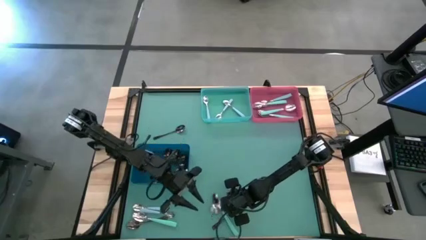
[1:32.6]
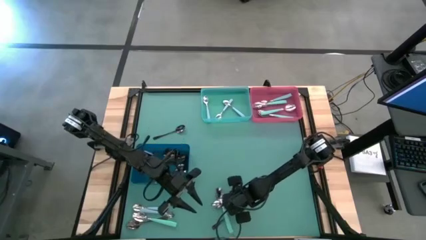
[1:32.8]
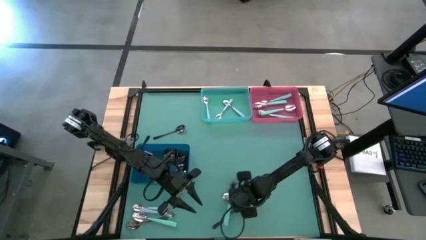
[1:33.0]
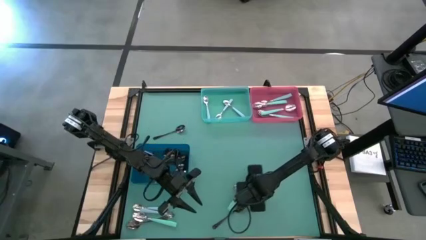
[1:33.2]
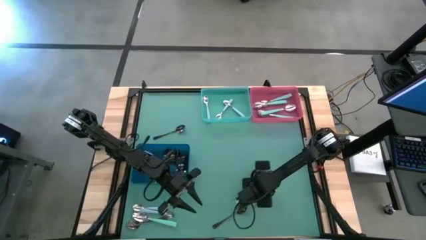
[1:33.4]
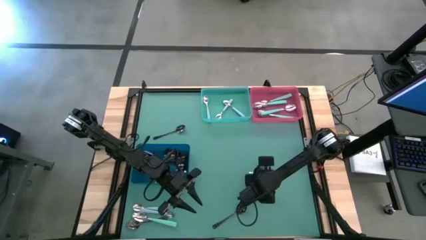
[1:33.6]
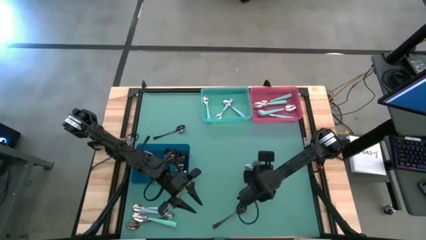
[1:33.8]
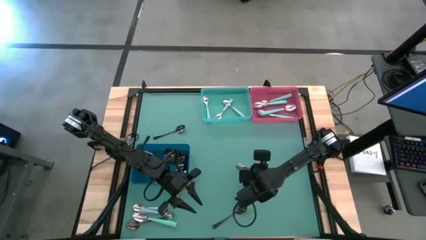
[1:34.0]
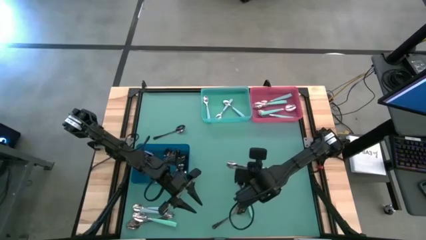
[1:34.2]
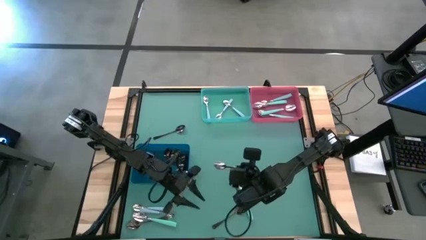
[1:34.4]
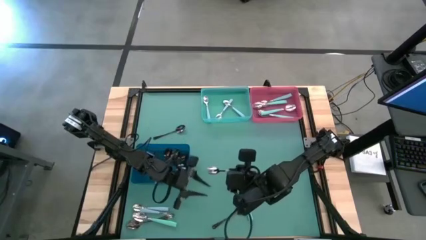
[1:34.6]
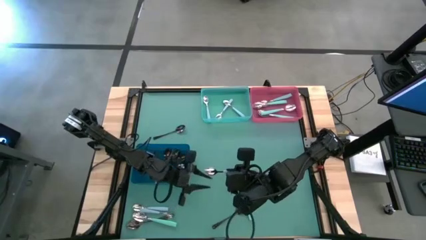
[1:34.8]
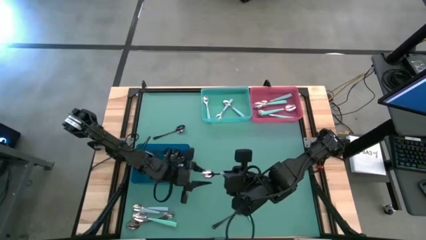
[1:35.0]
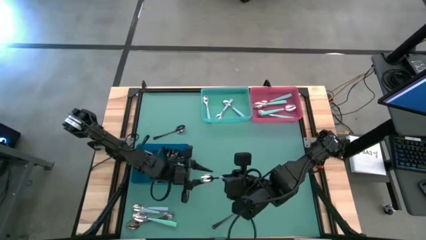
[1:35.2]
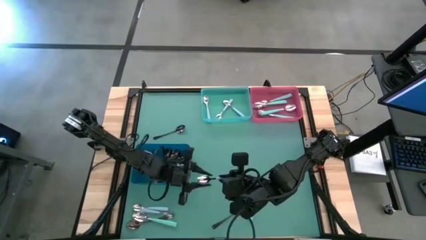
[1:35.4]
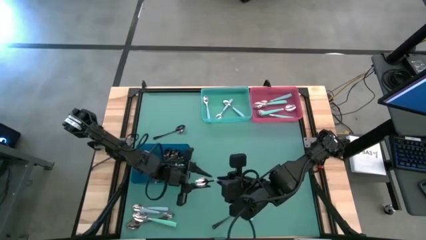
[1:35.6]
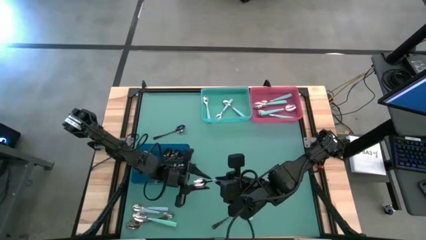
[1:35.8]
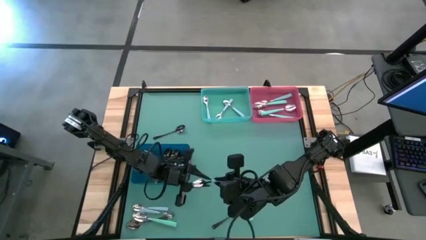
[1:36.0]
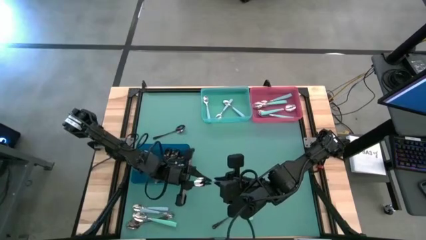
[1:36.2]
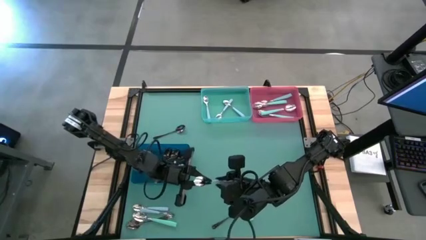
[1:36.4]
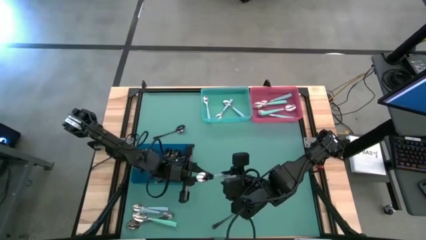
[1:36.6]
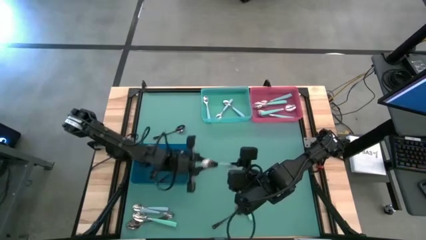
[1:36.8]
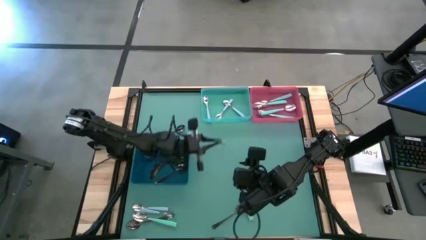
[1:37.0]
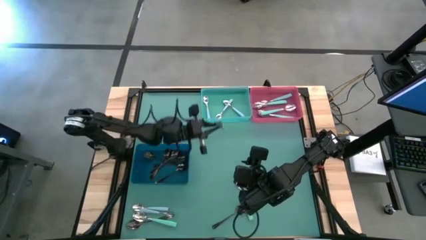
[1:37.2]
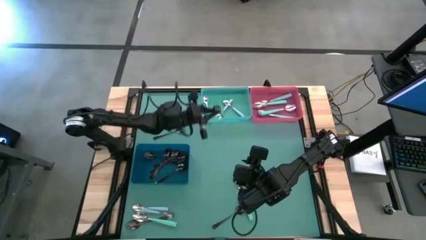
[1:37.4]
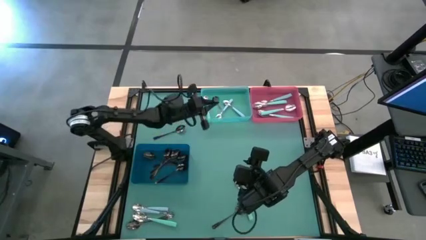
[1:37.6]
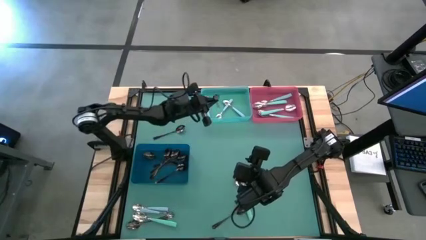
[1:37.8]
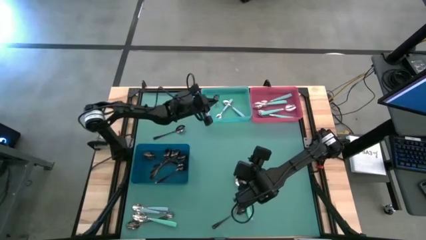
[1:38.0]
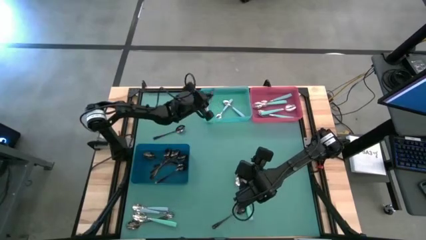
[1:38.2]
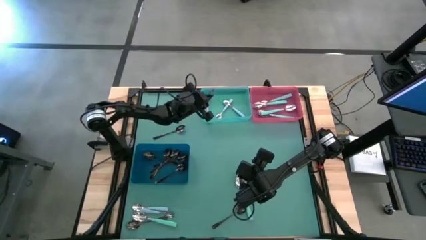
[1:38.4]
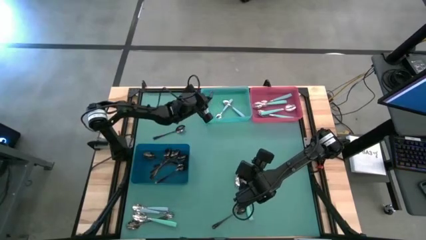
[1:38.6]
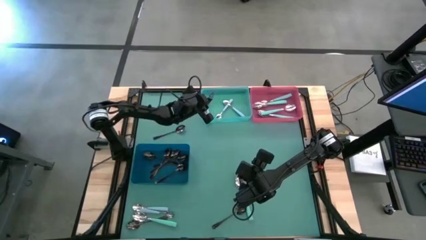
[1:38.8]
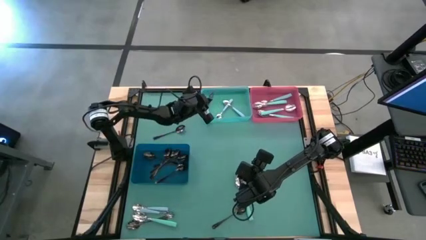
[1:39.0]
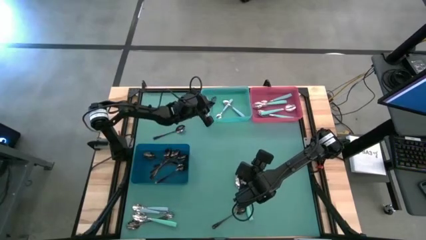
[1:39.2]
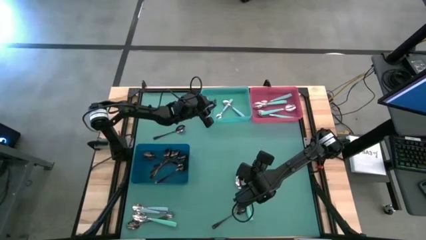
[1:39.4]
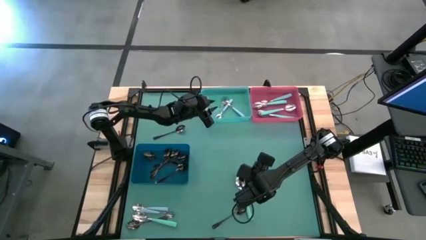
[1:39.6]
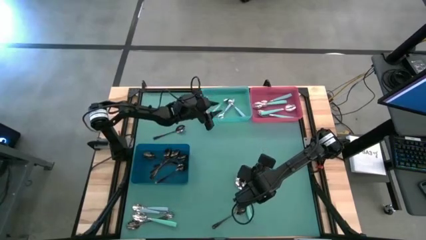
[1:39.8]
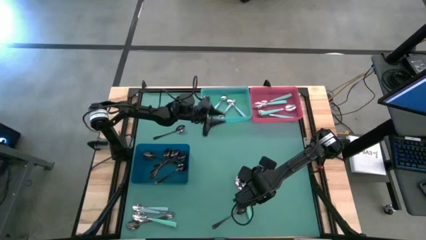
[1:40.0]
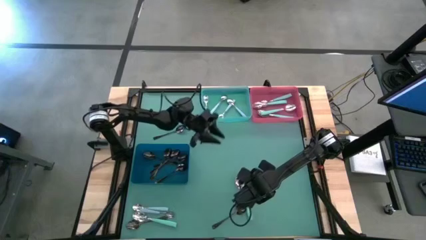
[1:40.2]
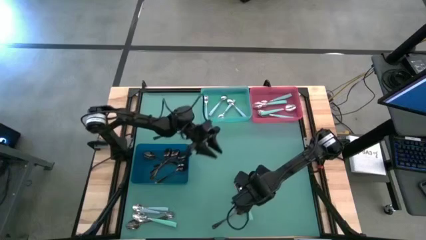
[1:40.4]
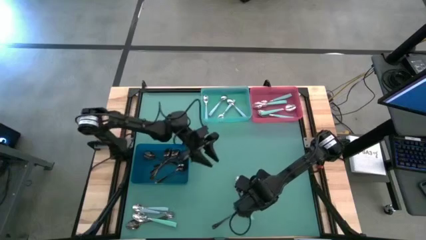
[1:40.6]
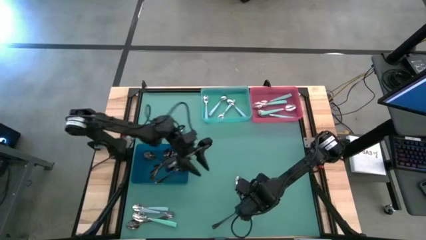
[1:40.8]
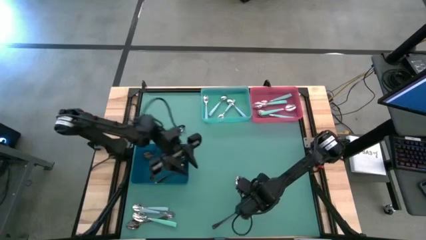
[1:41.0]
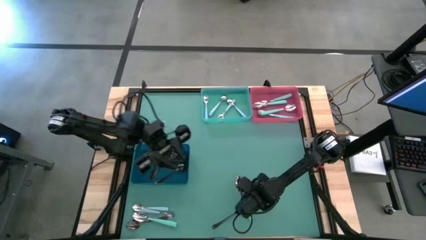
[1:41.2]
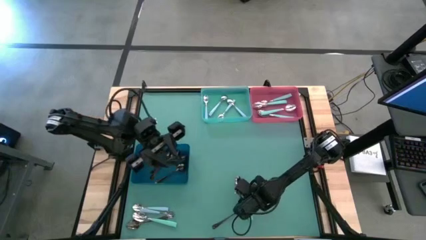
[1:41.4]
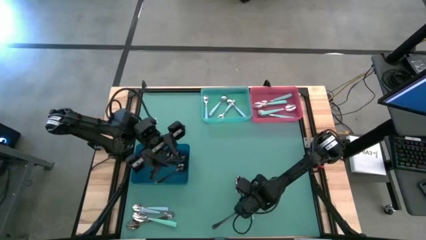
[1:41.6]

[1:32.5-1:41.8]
Task: Sort silverware by color (type)
Put the right blue spoon into the light blue bin

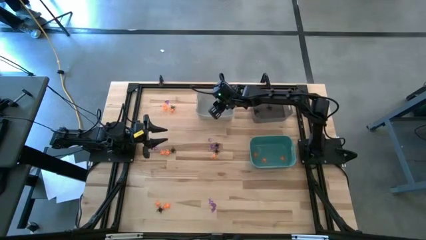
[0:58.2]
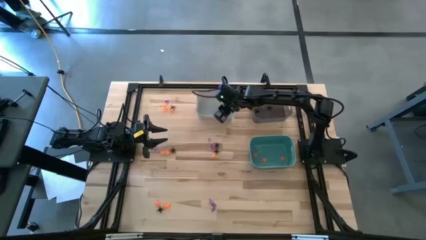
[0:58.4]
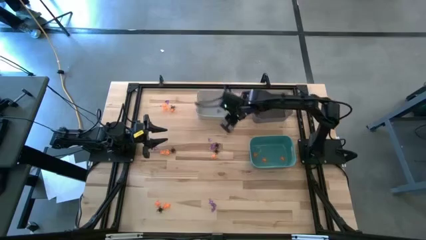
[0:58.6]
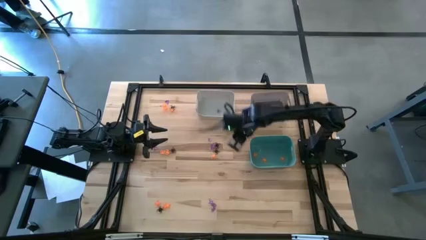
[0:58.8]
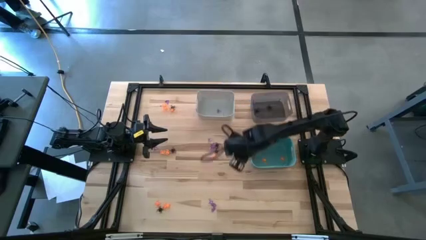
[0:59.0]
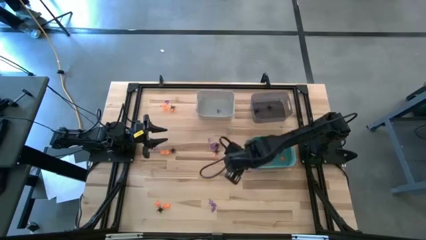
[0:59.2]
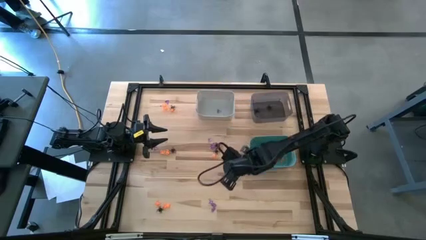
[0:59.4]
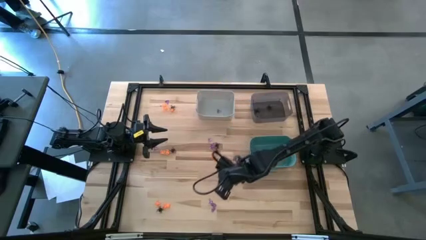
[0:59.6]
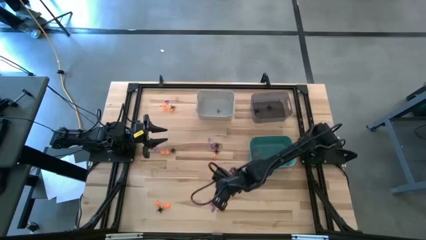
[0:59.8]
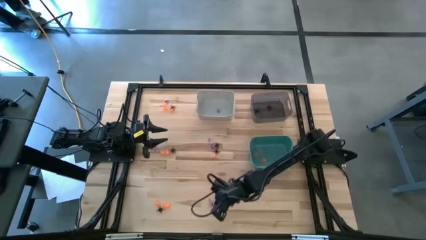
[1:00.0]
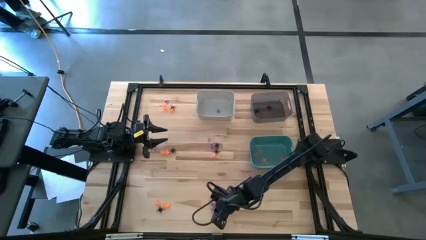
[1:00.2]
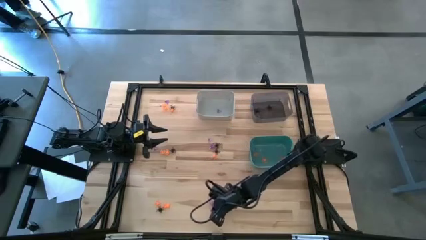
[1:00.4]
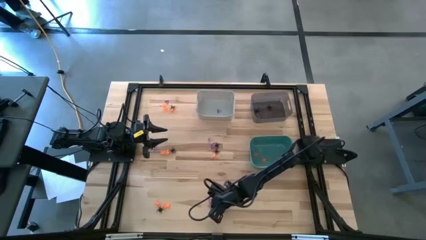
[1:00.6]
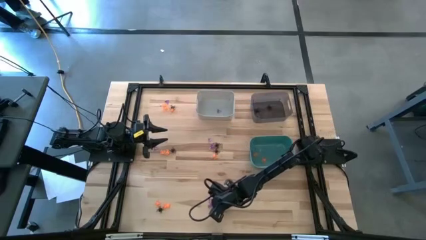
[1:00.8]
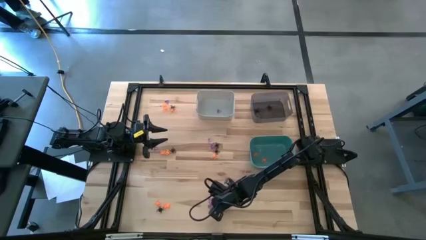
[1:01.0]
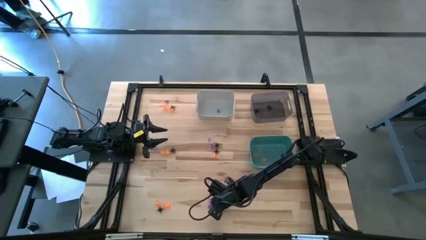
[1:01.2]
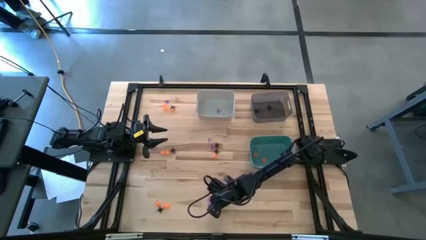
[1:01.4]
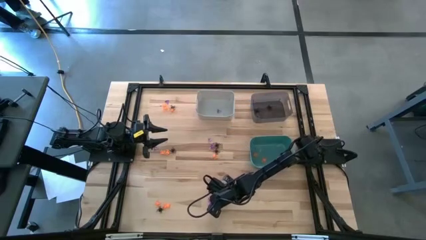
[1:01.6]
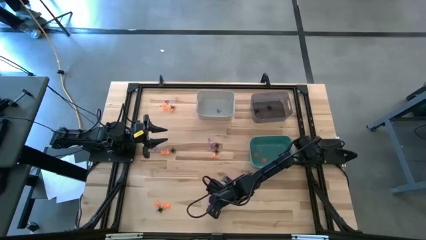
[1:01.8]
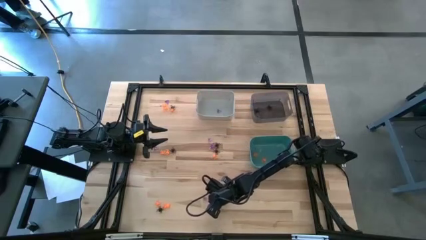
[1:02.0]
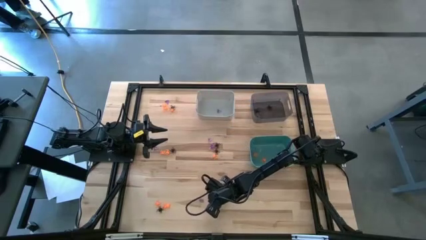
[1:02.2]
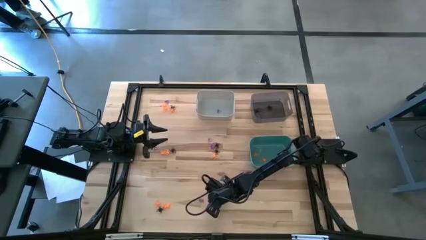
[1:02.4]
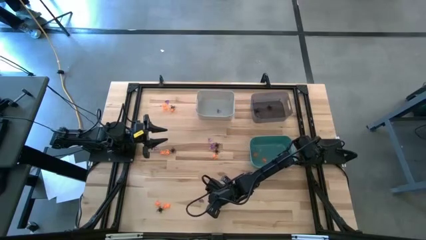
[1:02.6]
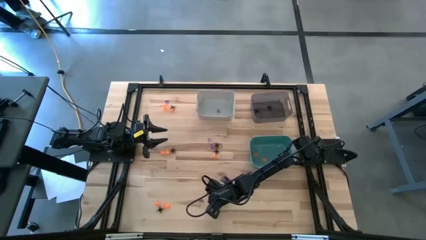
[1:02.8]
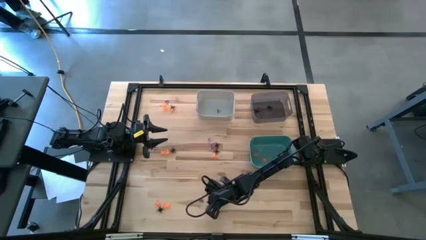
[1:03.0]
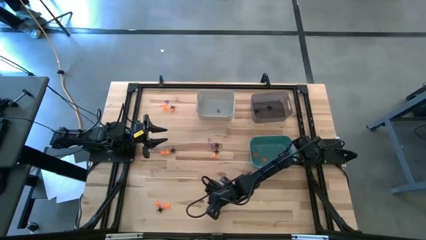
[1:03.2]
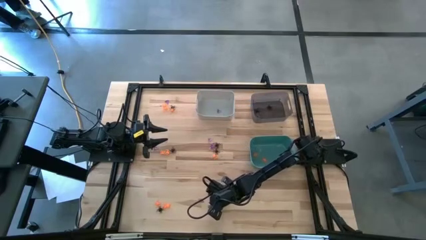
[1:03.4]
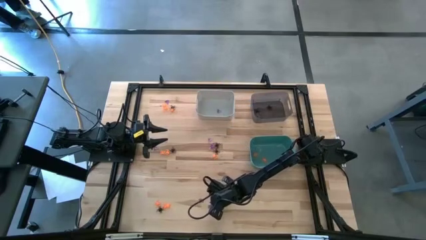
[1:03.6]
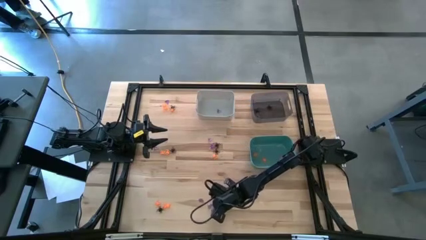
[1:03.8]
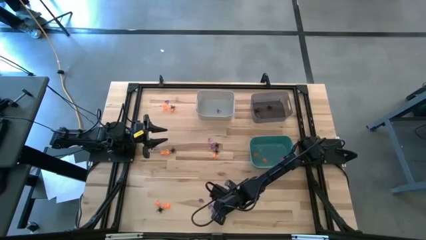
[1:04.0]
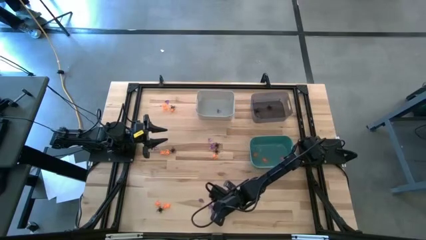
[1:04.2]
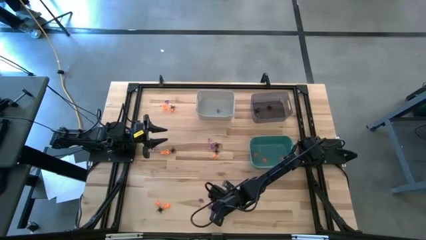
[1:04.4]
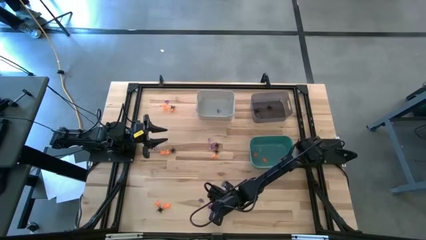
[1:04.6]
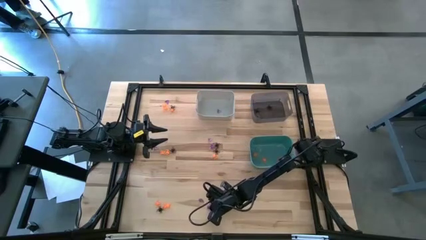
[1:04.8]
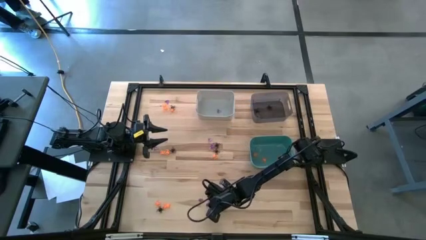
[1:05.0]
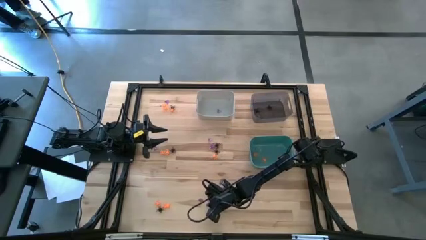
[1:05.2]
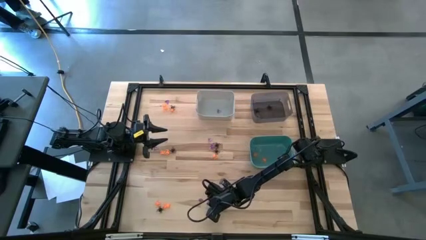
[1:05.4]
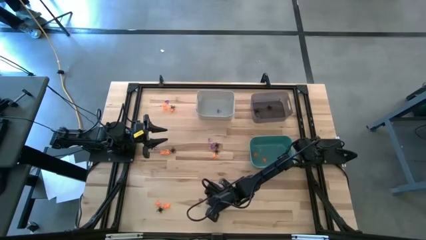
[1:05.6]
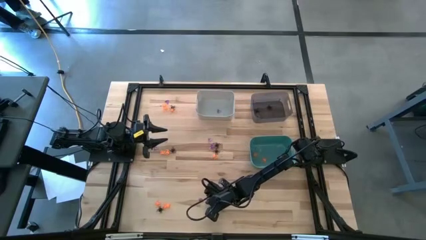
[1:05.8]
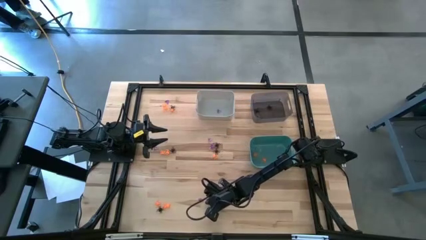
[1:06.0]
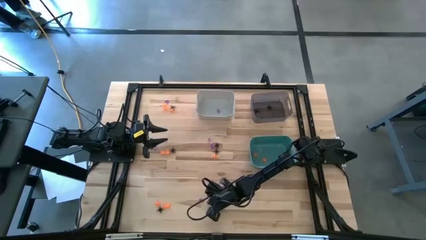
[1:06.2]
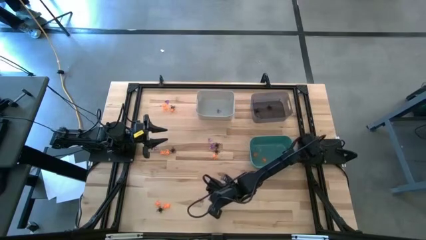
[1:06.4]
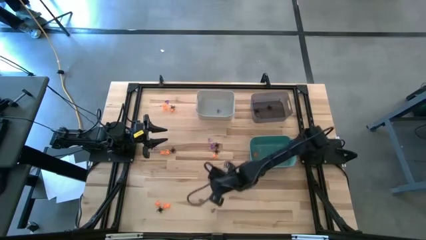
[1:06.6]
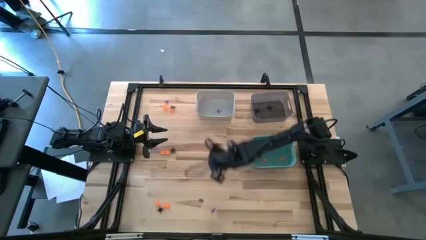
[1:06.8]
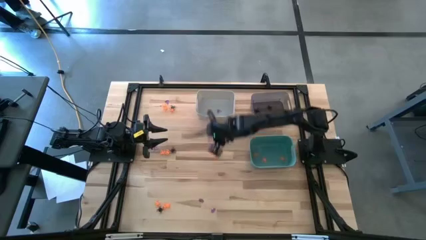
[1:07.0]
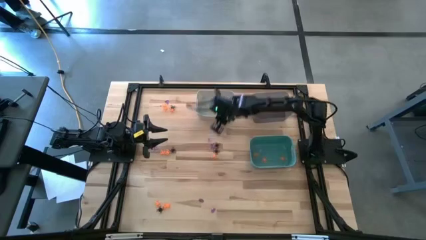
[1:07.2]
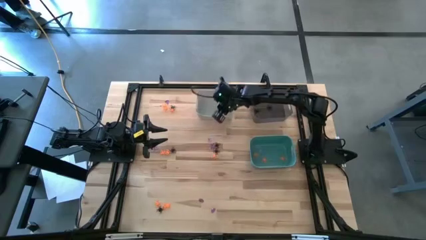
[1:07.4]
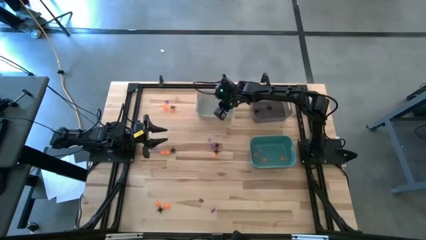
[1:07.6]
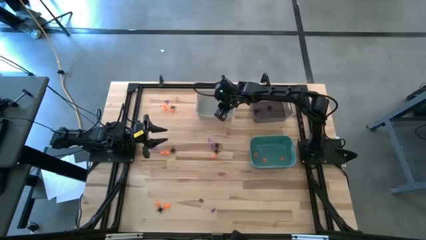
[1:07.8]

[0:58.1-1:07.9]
Task: Sort Halloween decoration
Put the purple witch hat toy into the white bin
